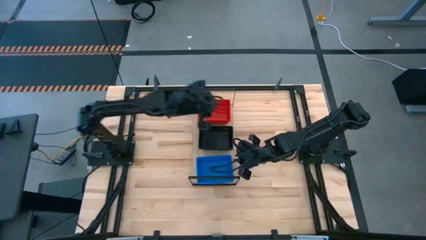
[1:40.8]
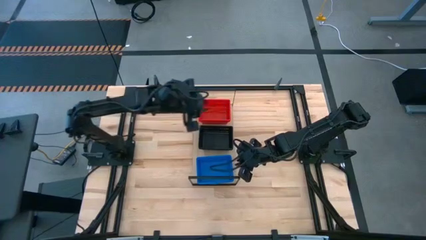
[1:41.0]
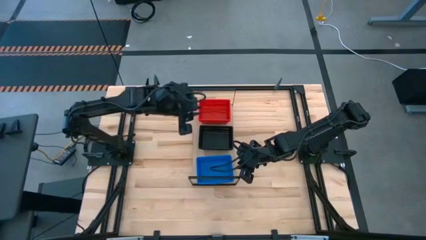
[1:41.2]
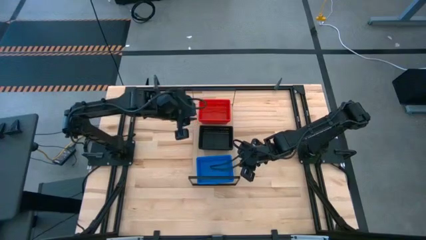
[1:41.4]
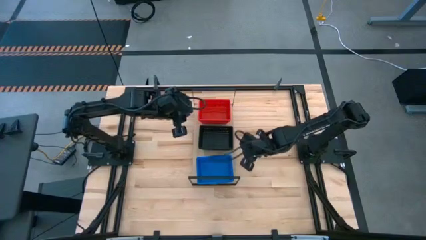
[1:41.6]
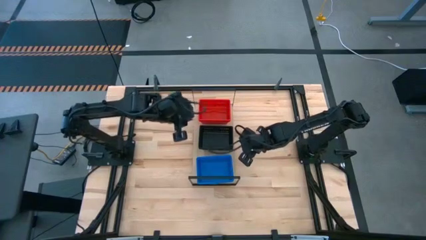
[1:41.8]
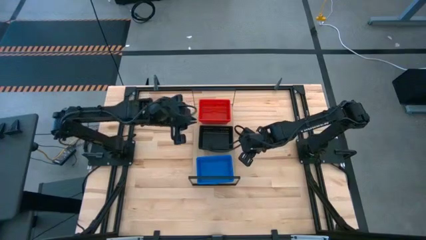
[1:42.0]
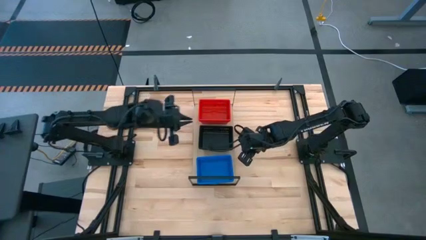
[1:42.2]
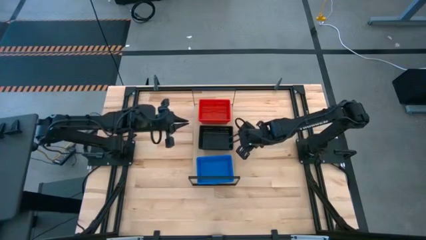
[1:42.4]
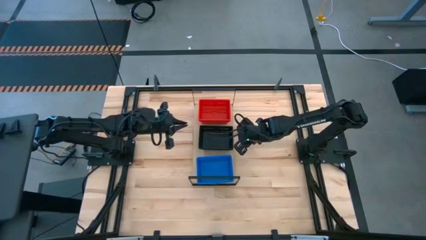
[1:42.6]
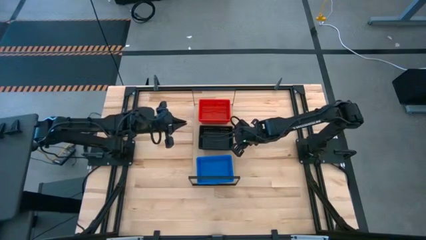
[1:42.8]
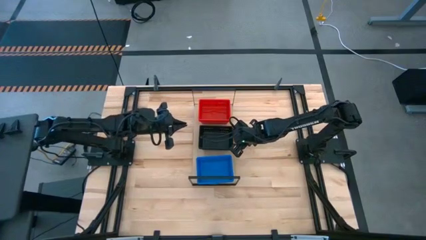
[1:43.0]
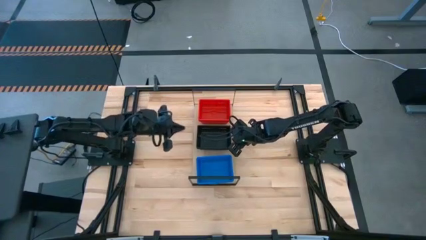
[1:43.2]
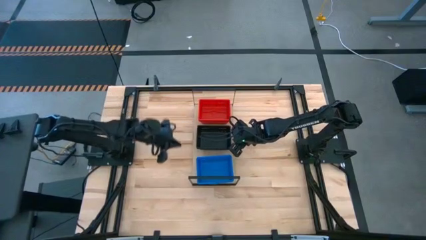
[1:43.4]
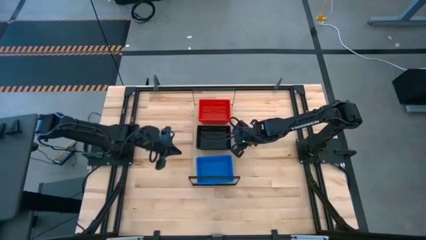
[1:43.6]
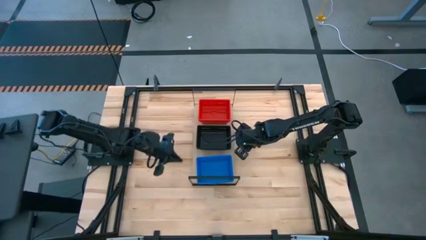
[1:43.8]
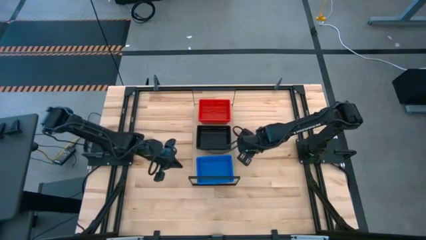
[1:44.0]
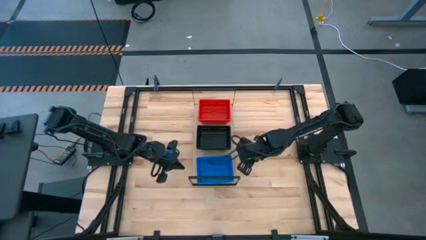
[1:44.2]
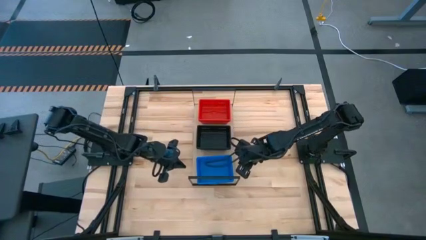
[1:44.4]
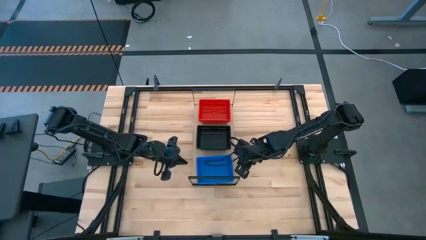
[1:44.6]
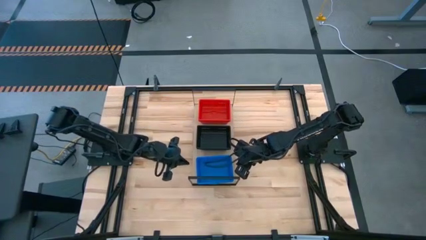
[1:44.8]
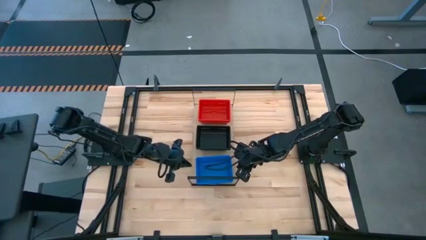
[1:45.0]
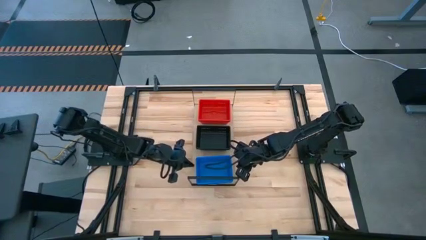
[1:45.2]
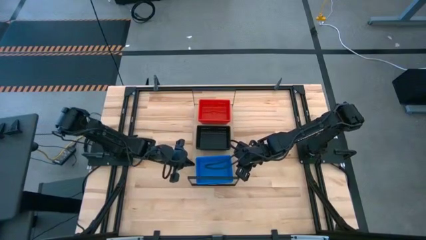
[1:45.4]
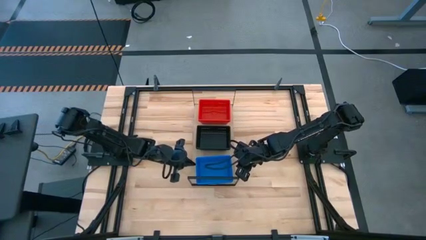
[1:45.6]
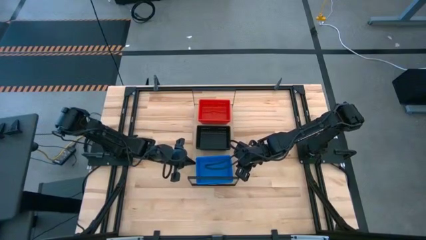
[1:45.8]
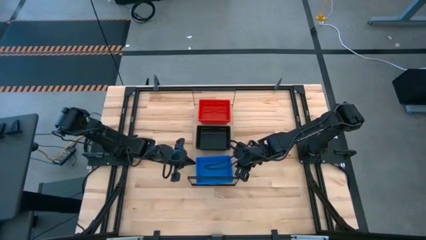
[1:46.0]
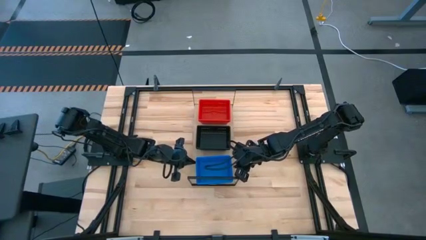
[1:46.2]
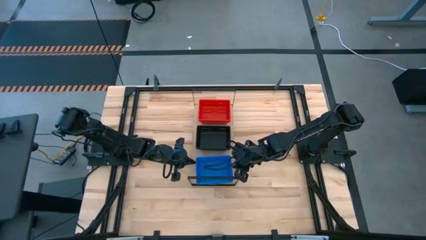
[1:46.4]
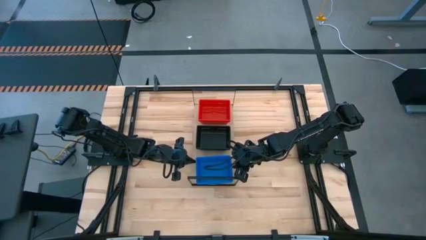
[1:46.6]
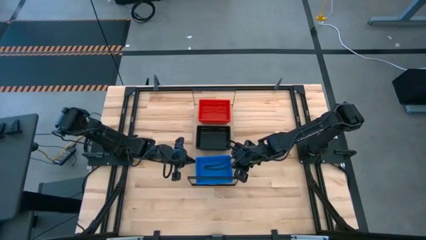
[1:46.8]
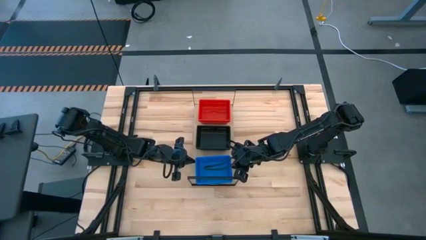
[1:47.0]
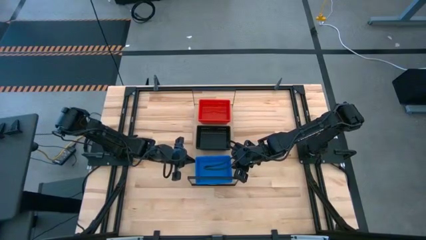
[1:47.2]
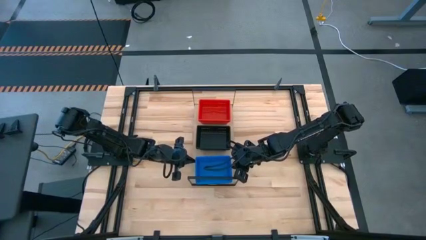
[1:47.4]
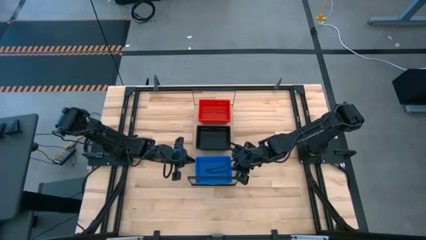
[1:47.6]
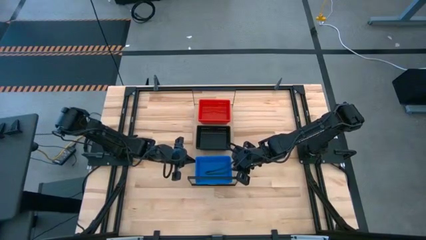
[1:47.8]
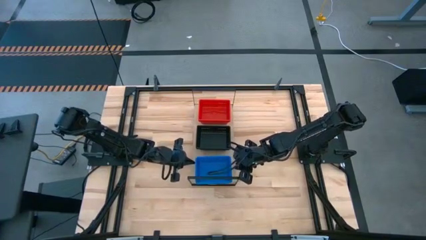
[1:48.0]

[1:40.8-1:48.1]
Task: Stack baskets on shelf by color
Adjust the bins on the shelf

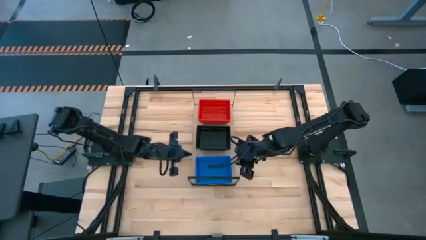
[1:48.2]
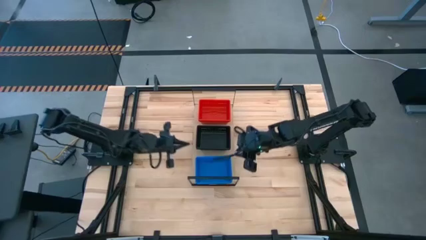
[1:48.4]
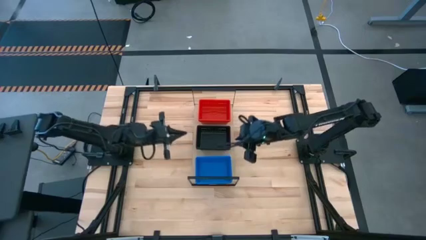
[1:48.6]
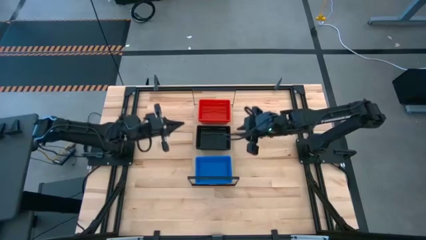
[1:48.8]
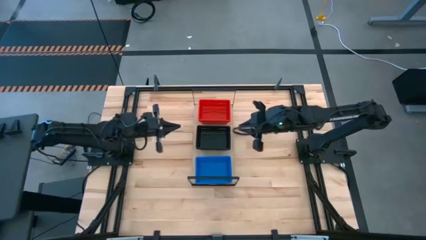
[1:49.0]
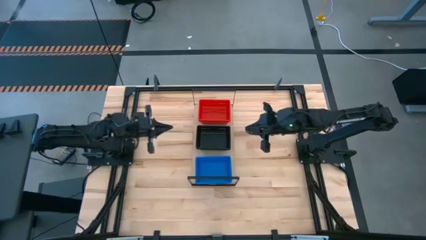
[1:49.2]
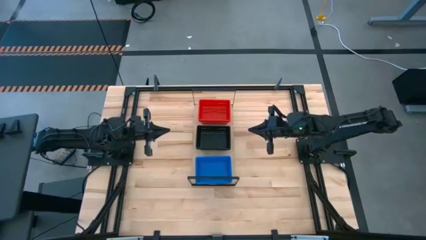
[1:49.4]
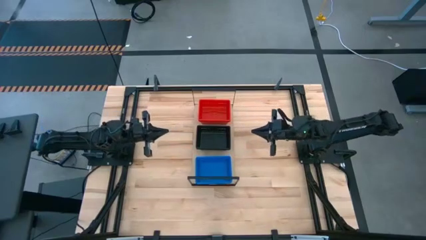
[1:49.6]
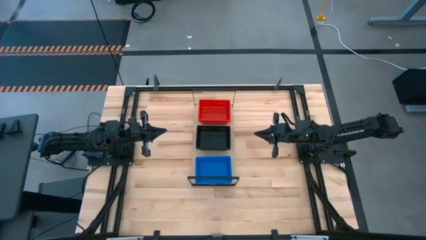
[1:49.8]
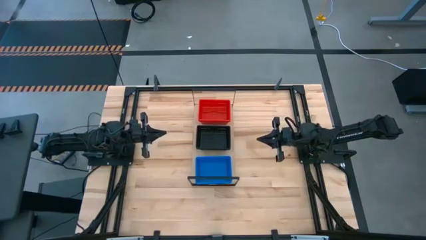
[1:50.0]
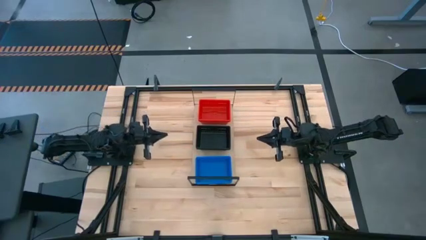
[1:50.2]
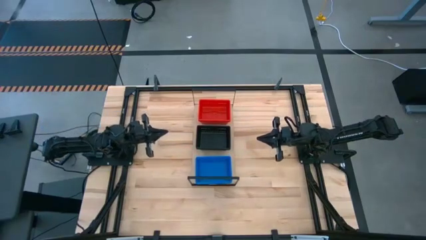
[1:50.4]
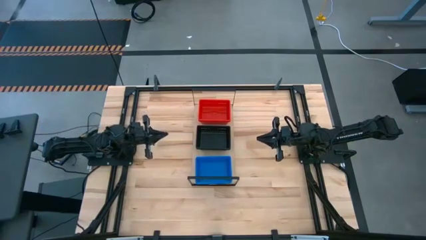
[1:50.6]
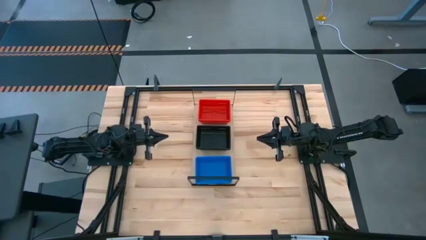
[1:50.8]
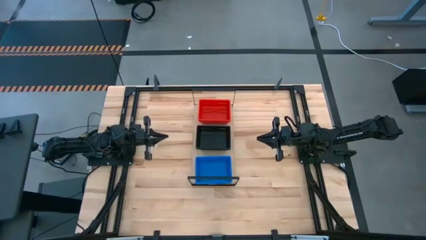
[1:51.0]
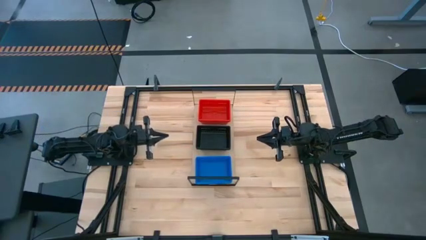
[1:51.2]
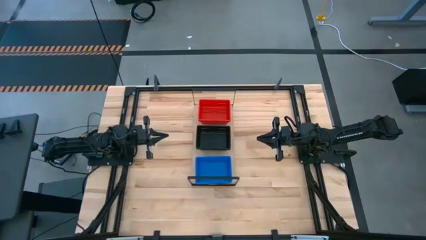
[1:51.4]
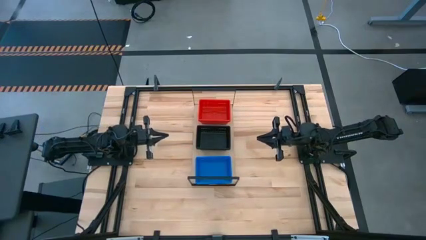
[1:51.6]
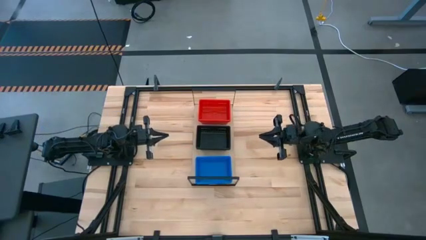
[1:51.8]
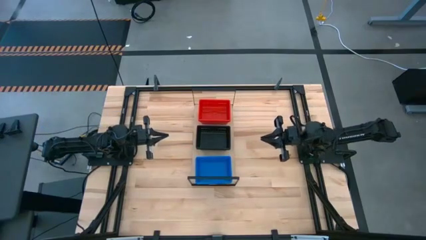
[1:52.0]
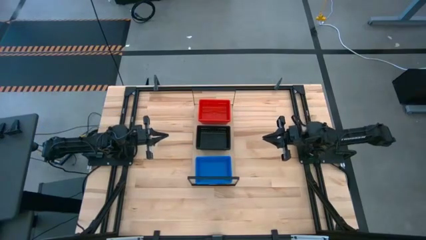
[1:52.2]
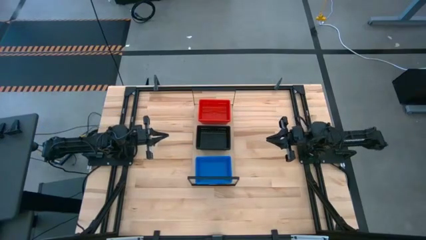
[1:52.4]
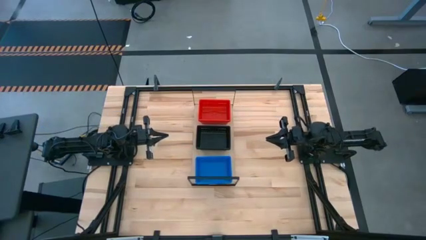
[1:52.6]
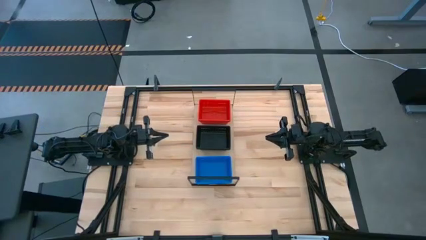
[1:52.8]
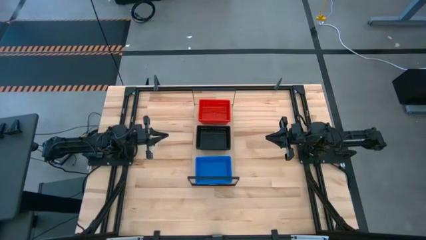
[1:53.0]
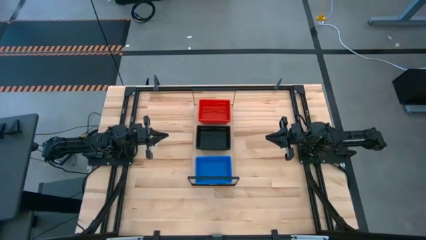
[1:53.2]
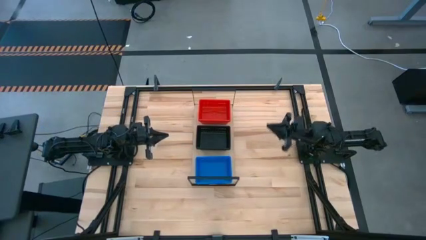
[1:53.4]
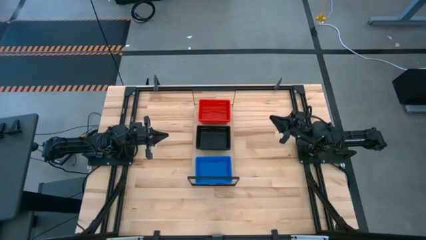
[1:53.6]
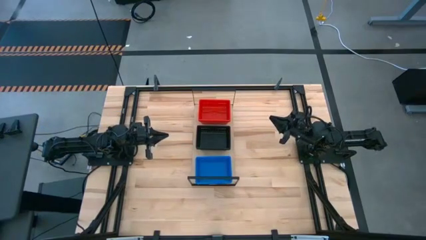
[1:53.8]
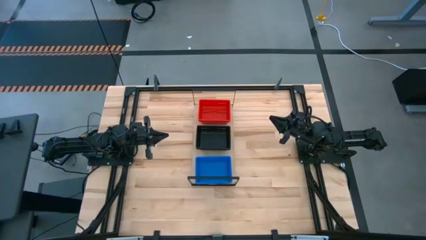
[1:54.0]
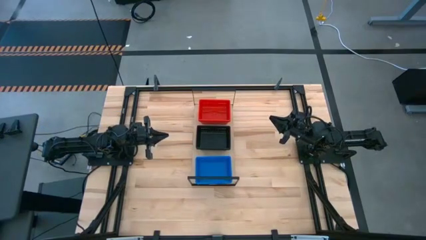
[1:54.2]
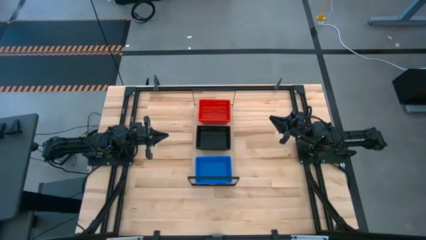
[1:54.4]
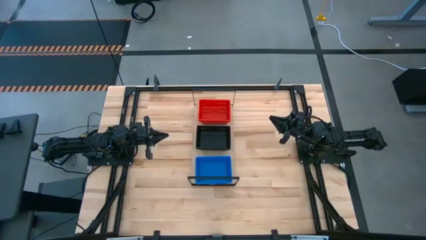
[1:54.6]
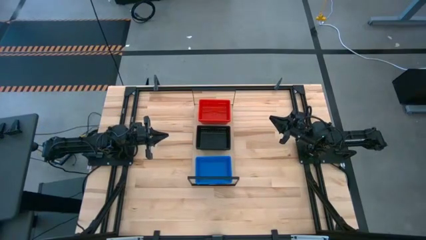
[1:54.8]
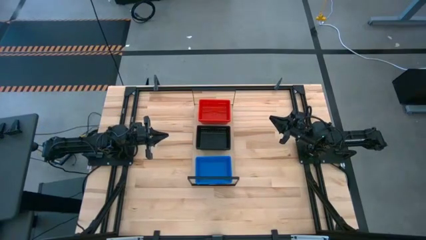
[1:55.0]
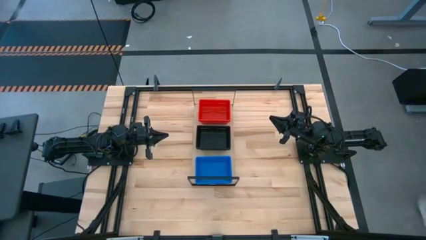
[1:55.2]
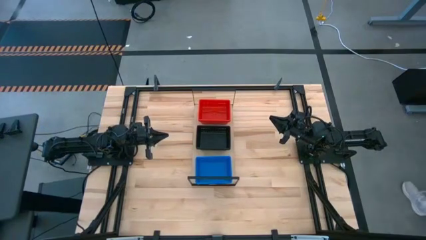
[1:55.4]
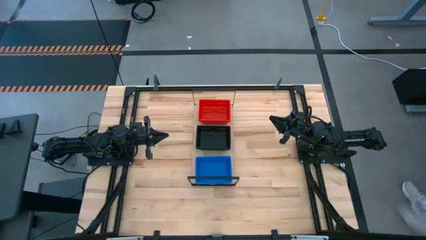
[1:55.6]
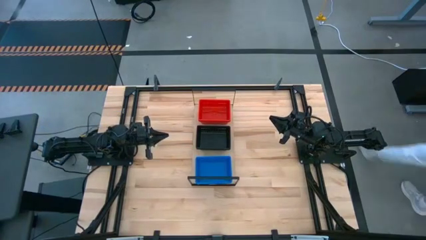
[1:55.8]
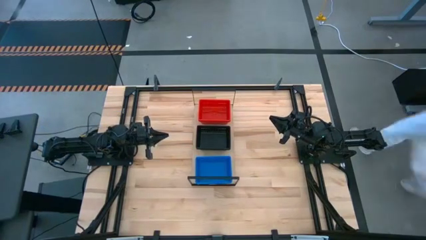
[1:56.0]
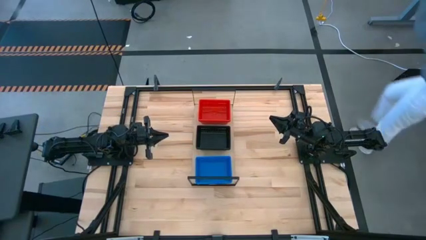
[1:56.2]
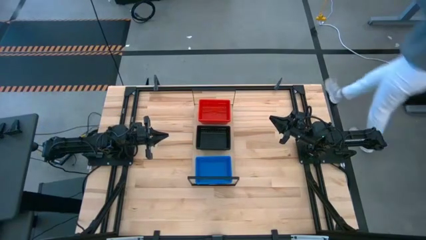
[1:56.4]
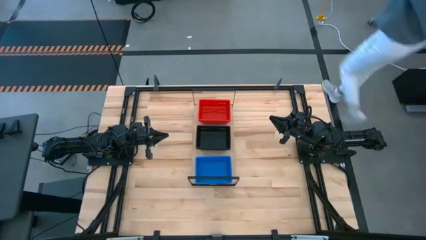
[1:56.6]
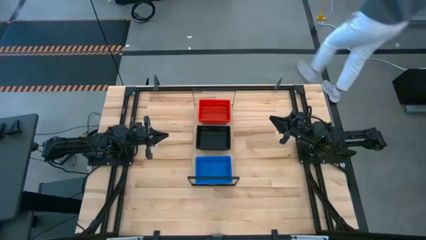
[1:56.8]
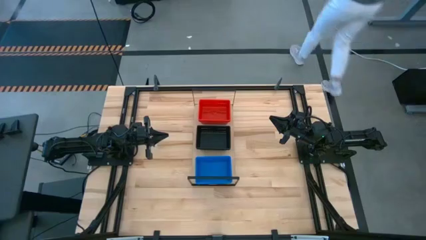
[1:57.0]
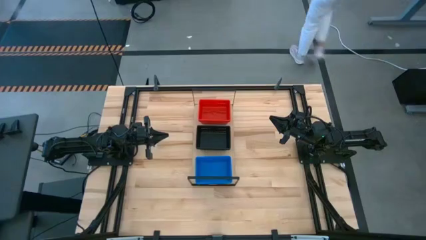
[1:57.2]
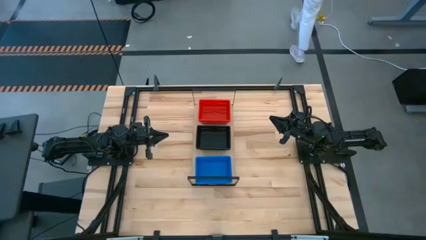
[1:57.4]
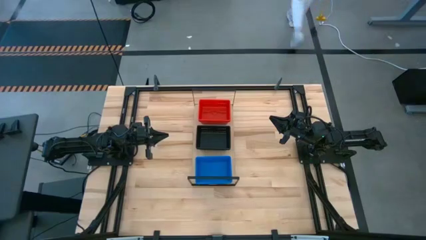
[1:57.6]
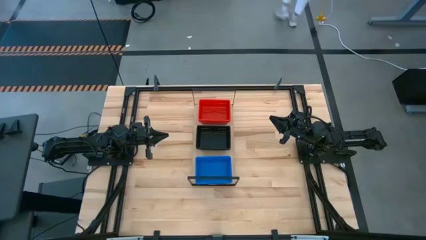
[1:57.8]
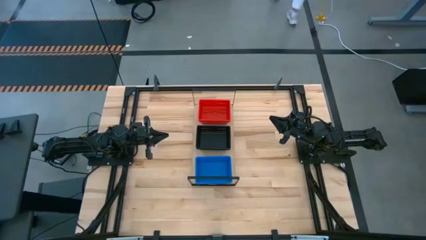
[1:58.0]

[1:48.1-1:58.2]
Return to Home Position
